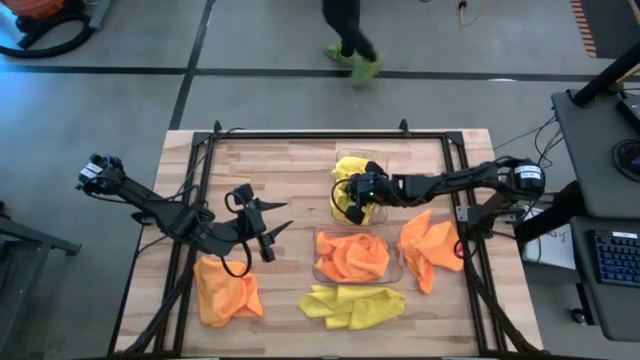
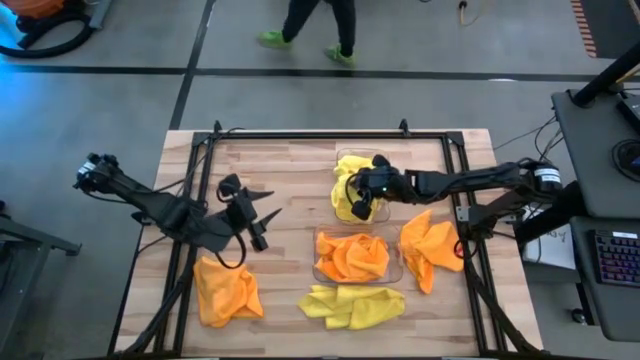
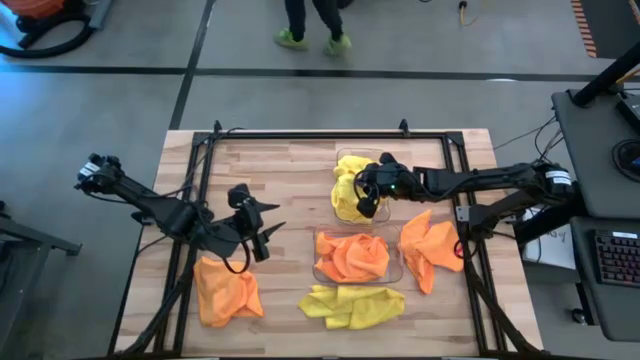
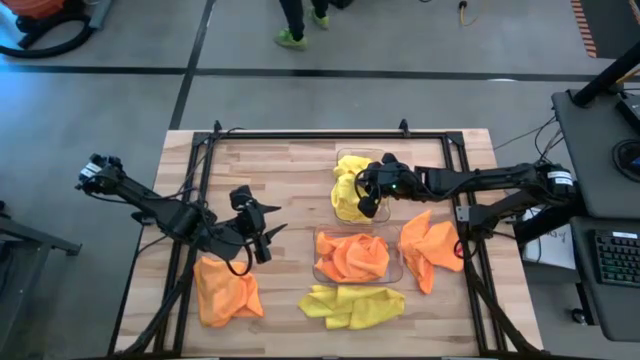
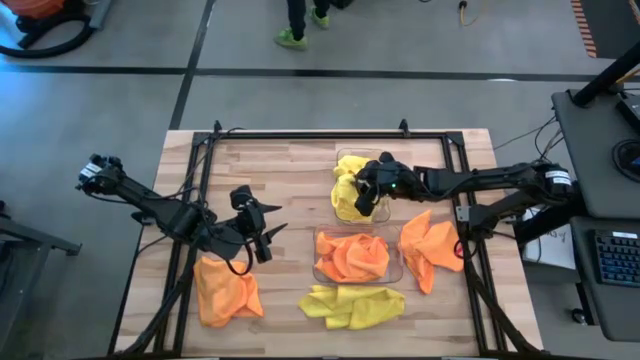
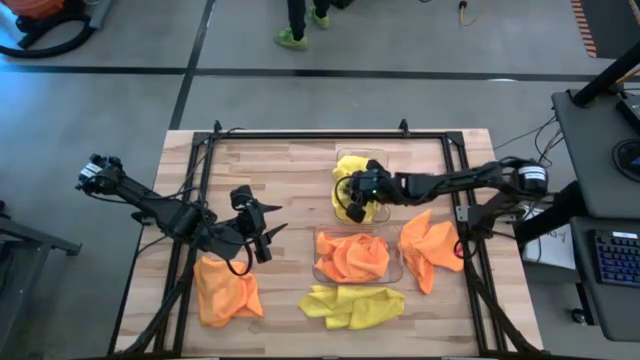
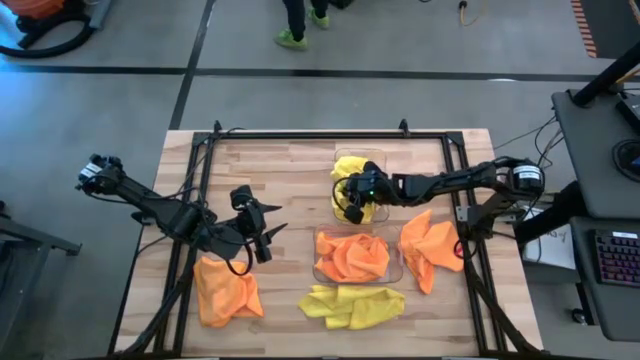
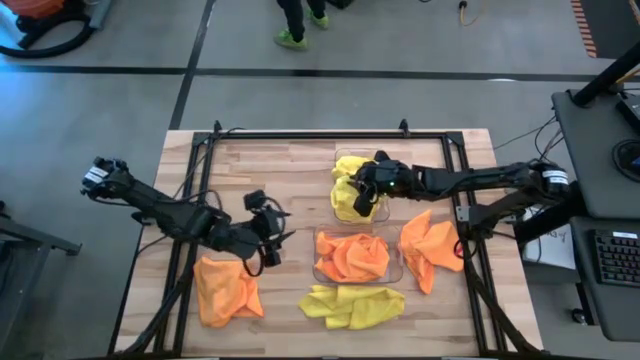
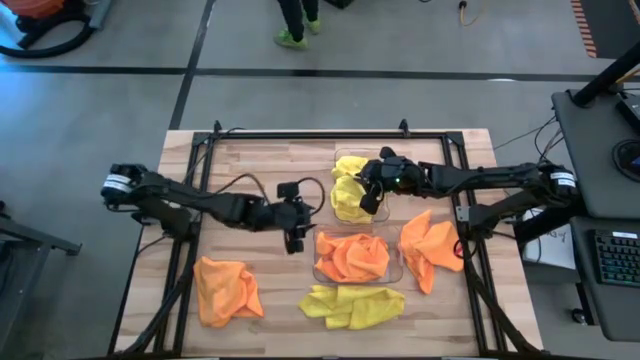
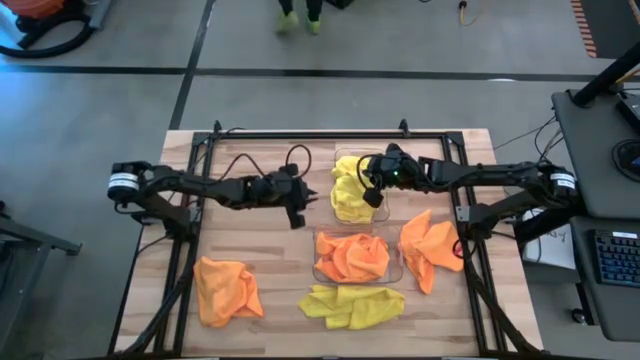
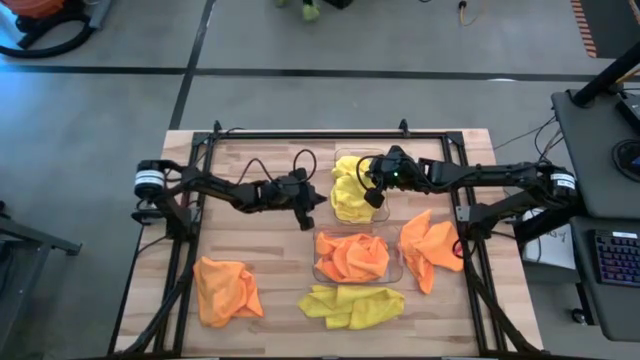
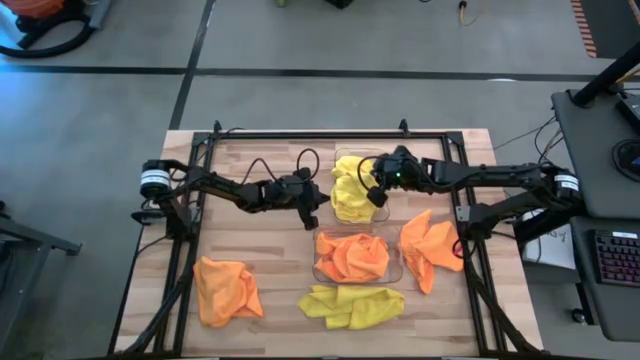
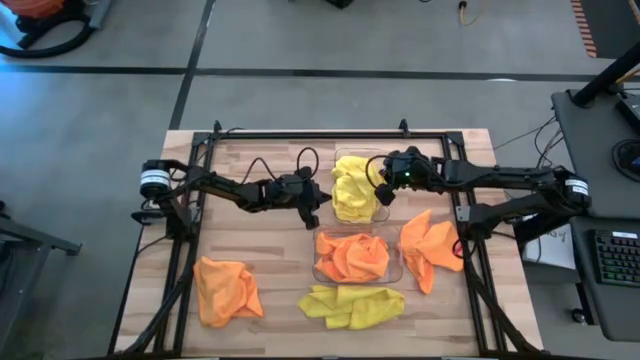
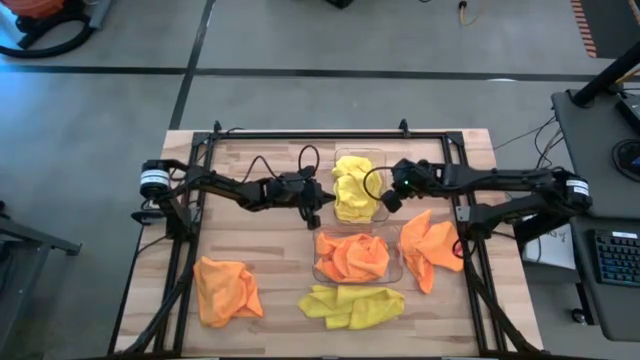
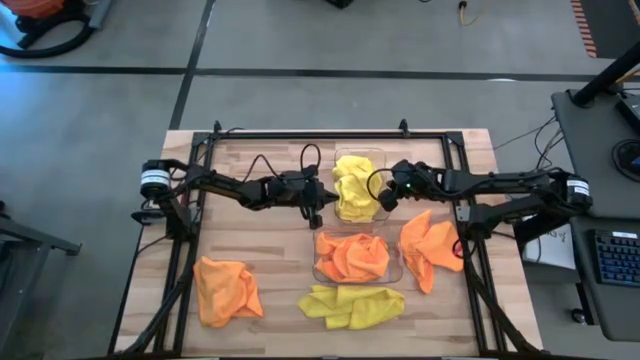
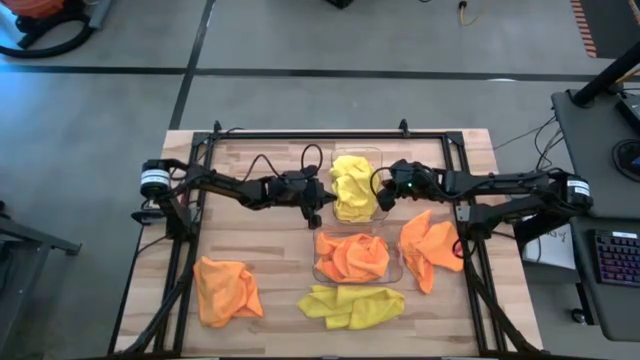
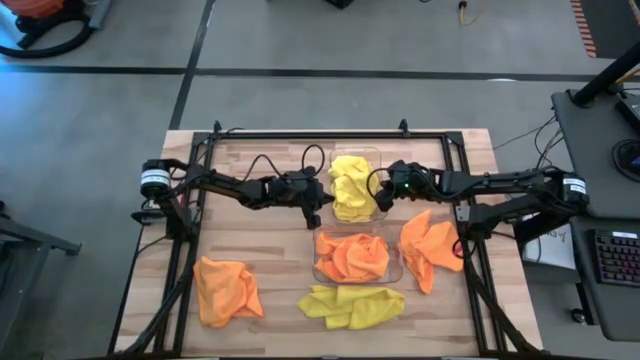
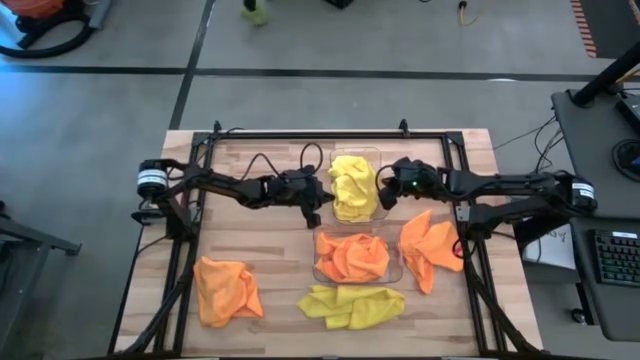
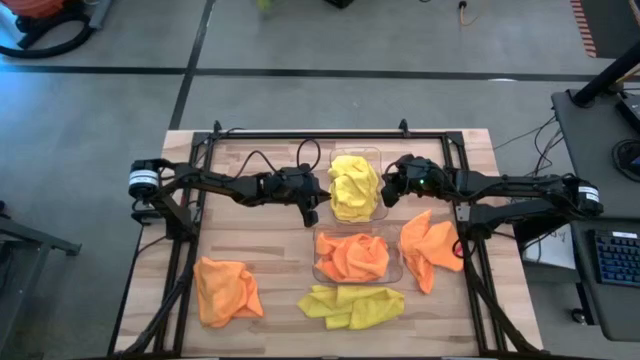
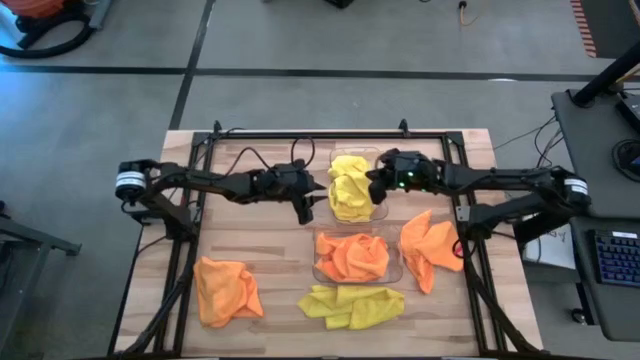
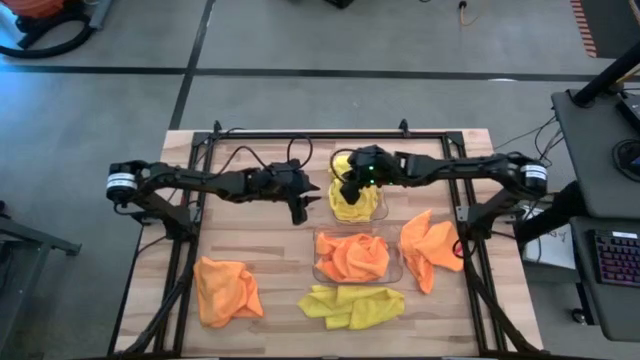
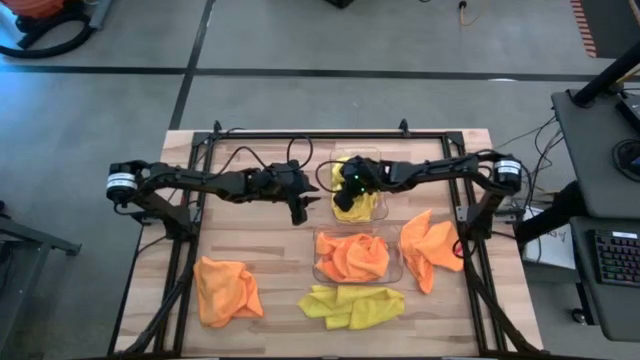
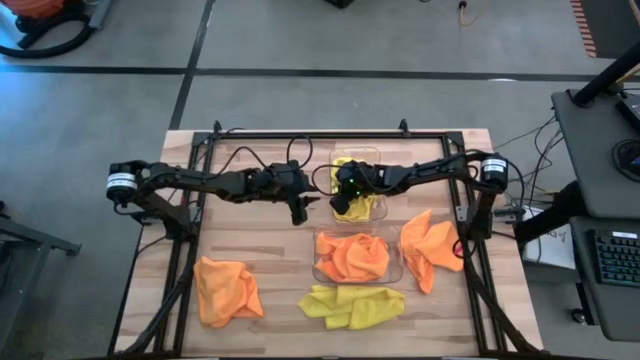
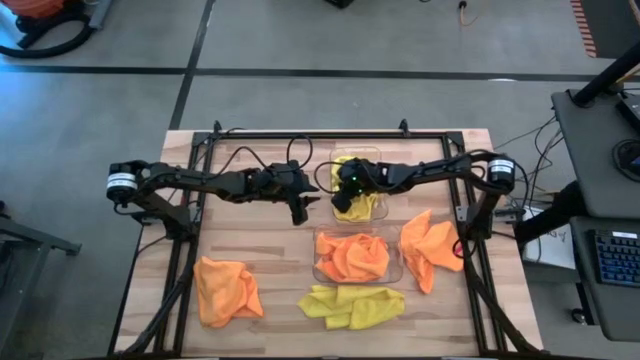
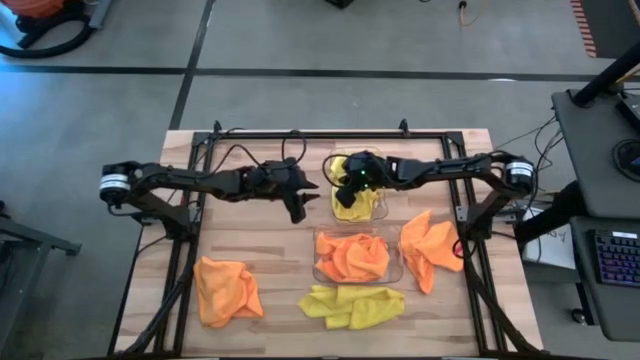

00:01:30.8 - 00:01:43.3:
Task: Sort microfiber towel by color & place in baskets
Put the yellow towel into the top transparent bin

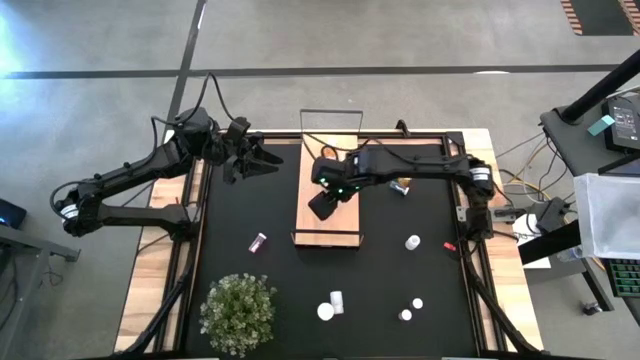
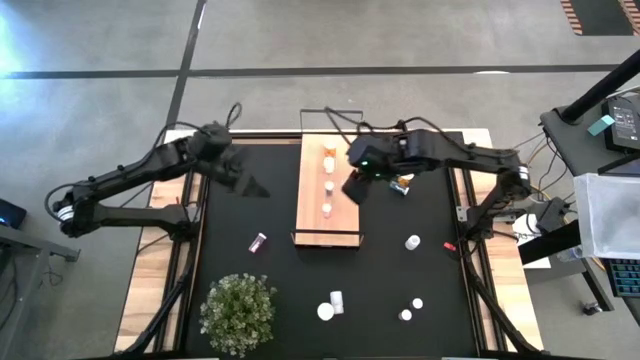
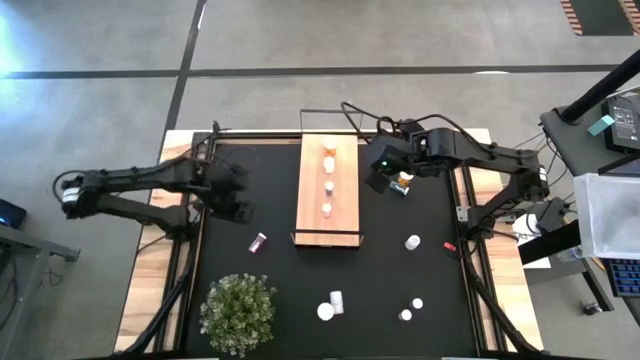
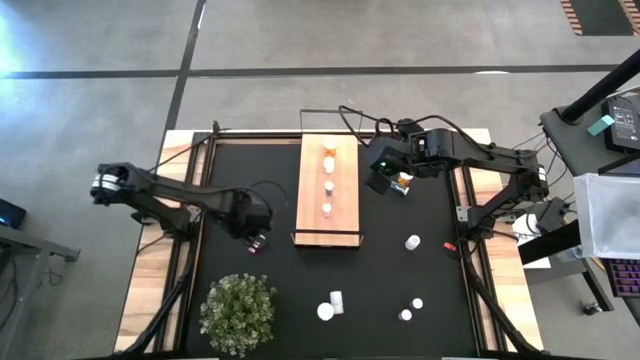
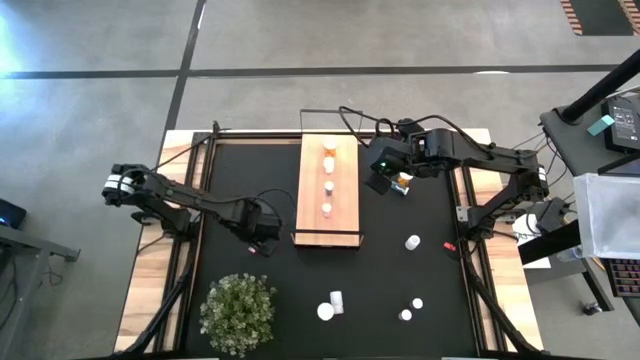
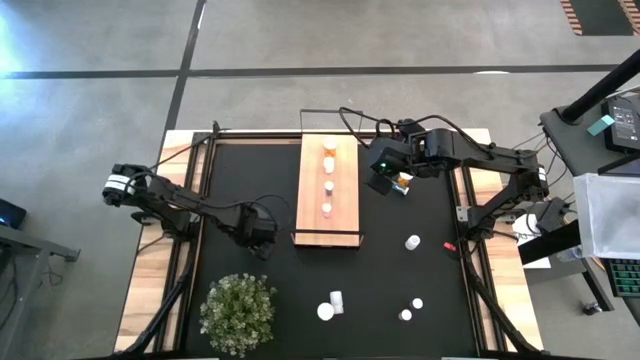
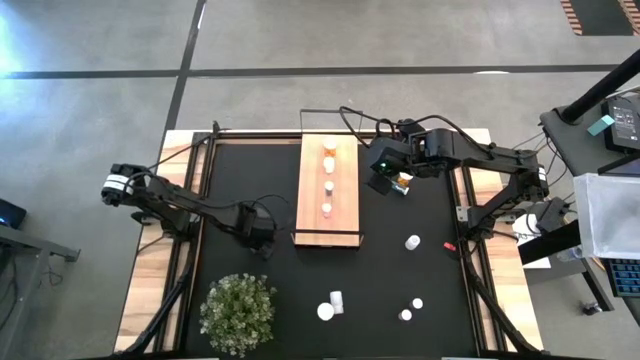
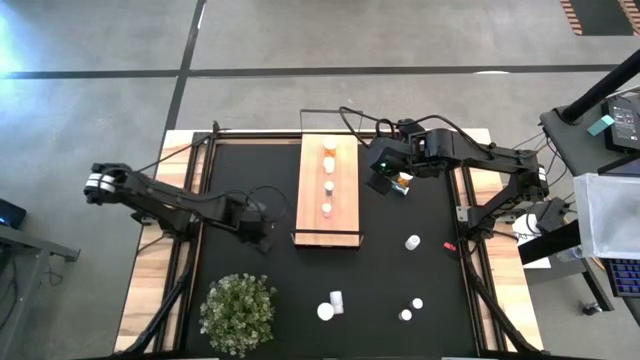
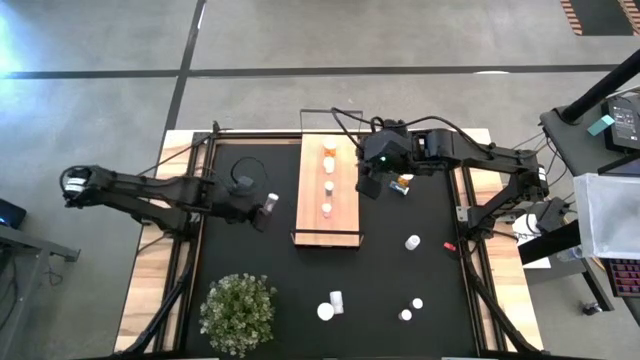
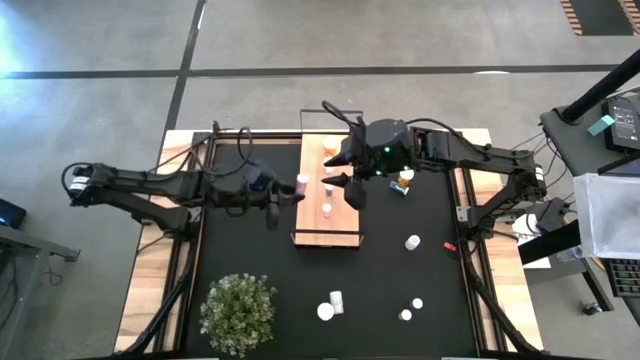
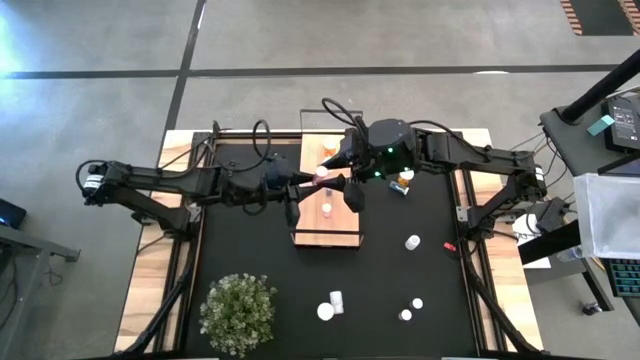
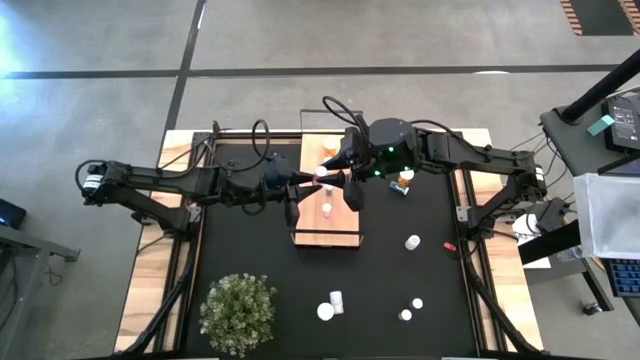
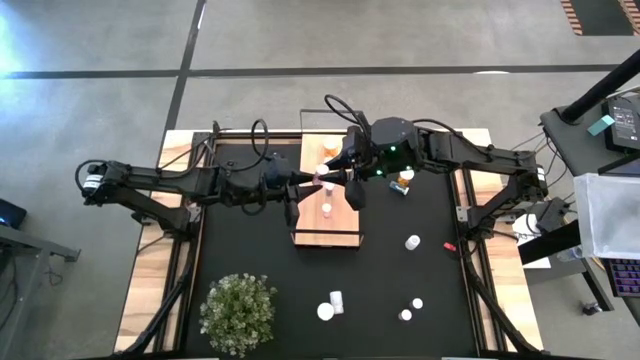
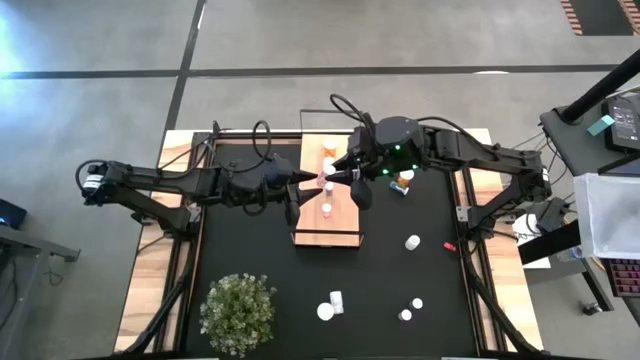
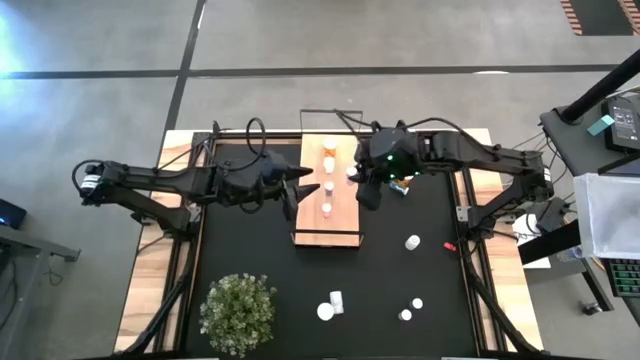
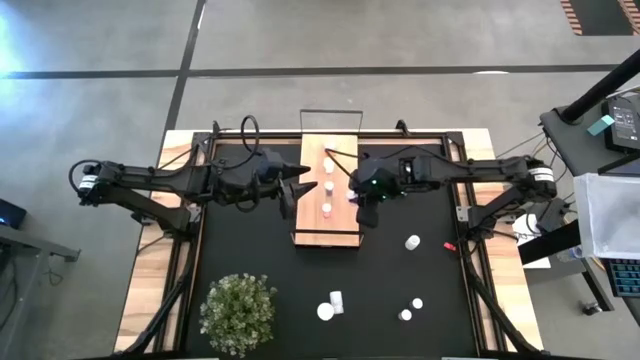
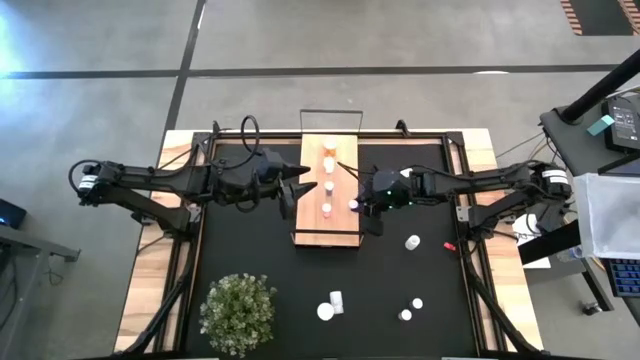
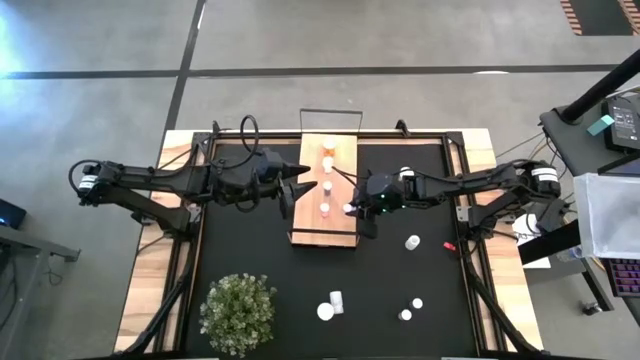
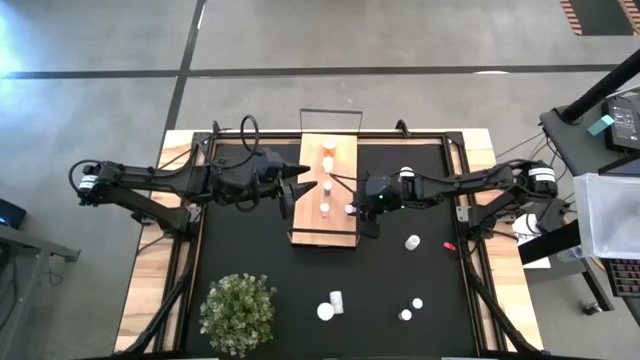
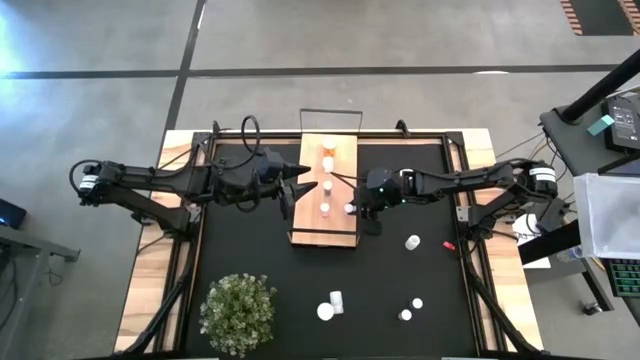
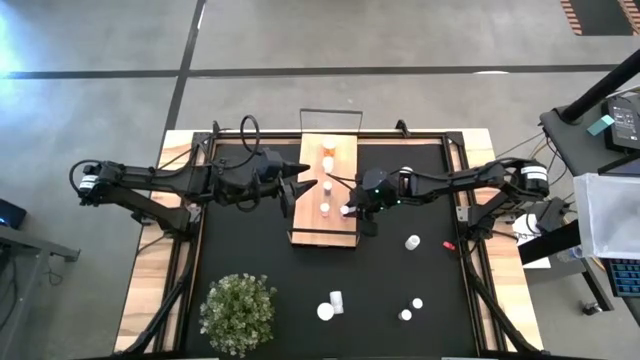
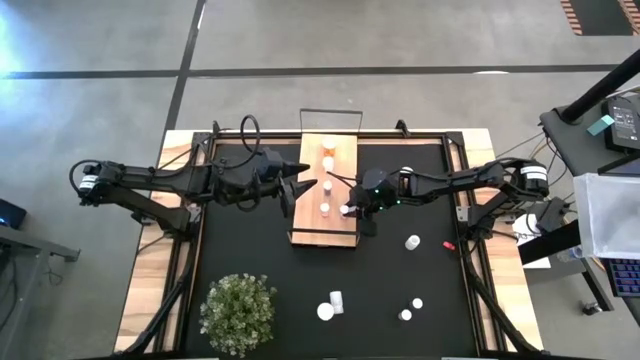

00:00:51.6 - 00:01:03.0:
Task: Pick and place medicine bottles onto shelf by color
Put the top pink pill bottle on the shelf aligned with the other pink pill bottle
